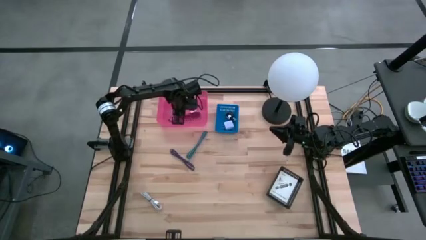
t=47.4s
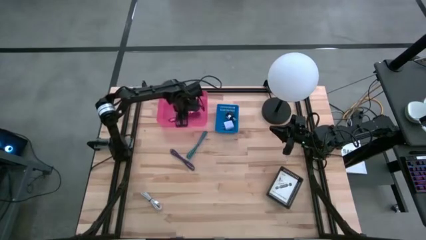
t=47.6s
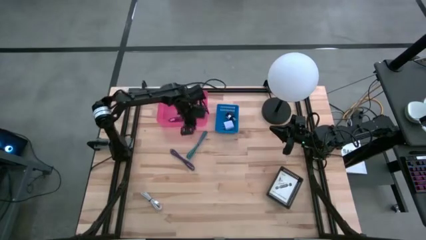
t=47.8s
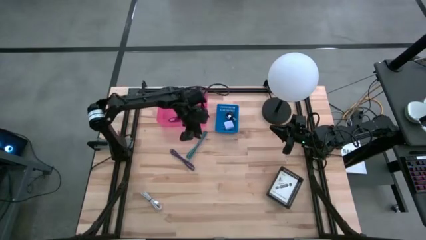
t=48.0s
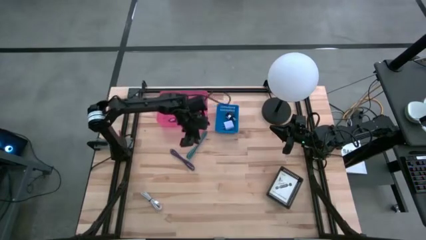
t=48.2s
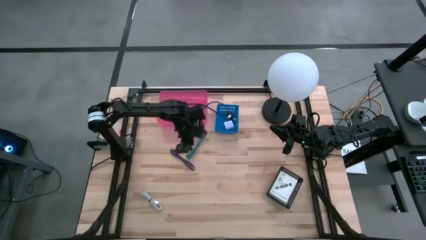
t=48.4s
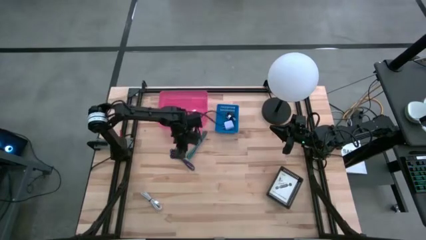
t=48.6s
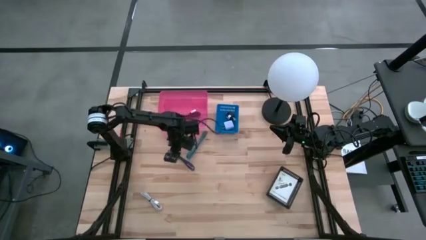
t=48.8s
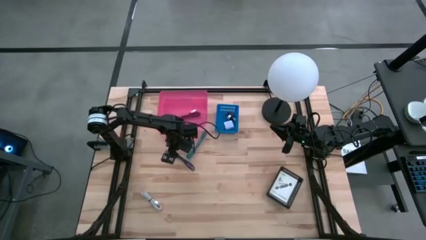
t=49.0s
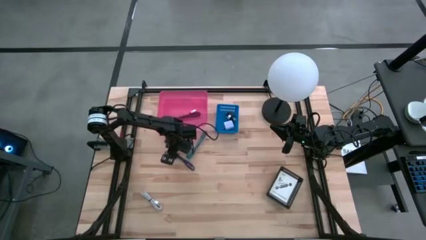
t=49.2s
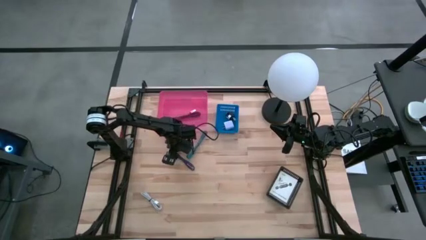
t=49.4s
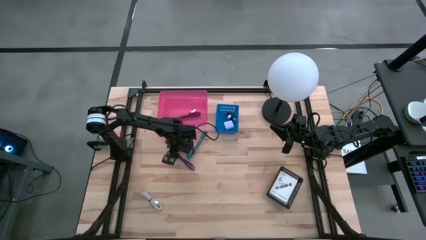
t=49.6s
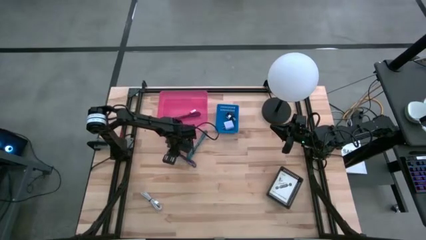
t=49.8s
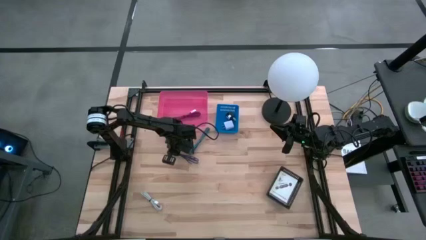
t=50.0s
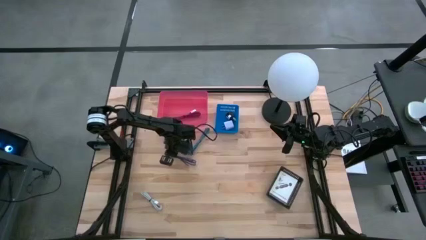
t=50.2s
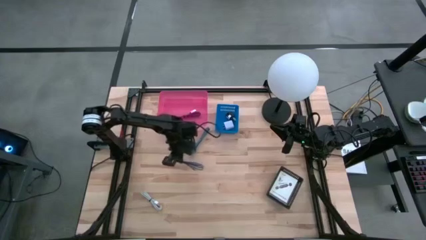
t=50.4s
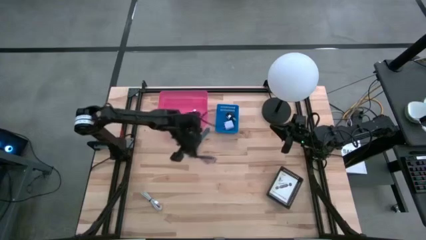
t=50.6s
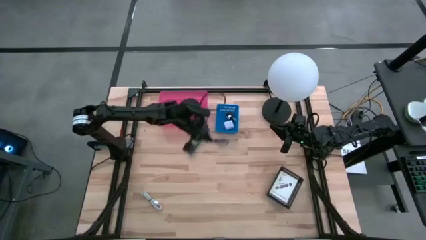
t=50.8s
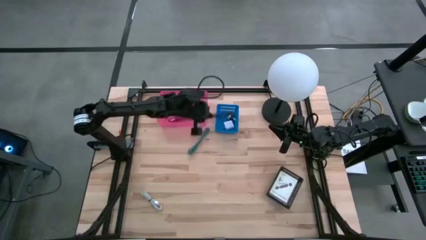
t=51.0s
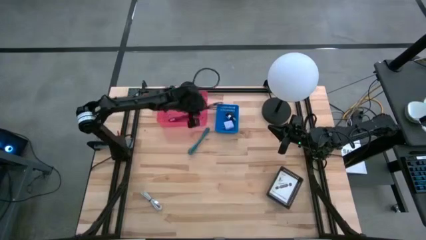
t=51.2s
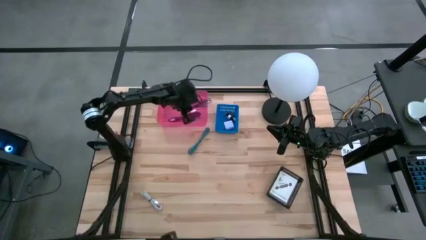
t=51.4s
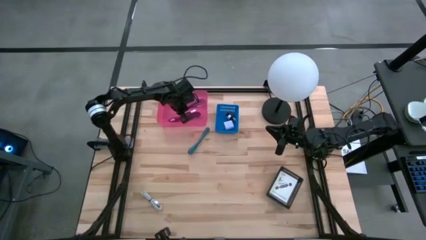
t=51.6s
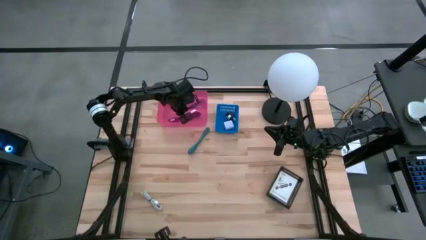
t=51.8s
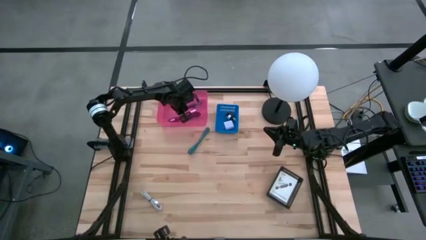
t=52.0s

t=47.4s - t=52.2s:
Task: Pick and place items into bin
Put the blue charger cable into the pink bin

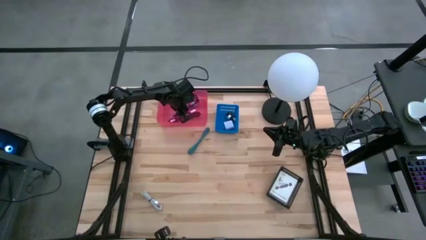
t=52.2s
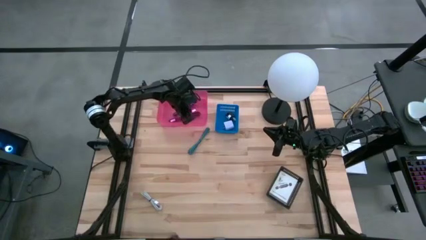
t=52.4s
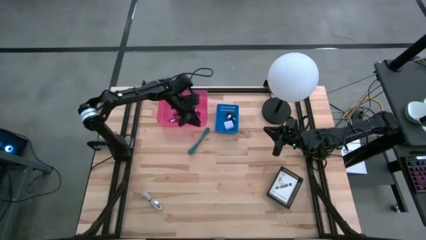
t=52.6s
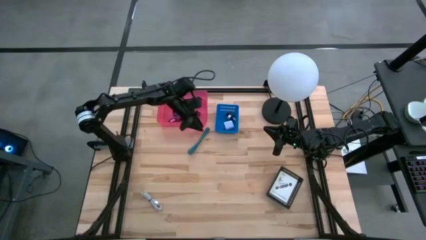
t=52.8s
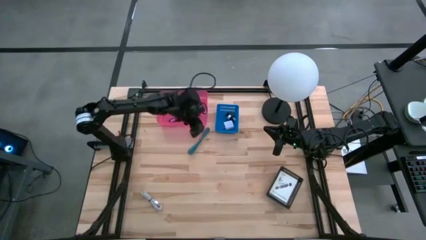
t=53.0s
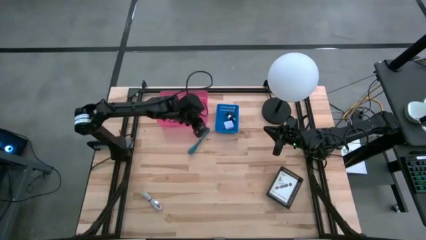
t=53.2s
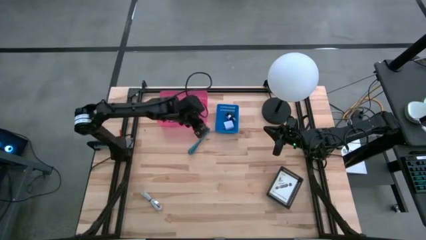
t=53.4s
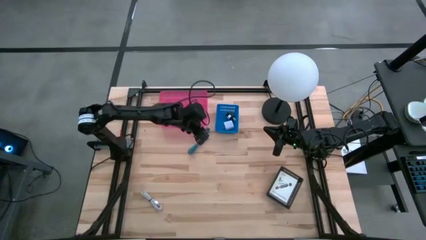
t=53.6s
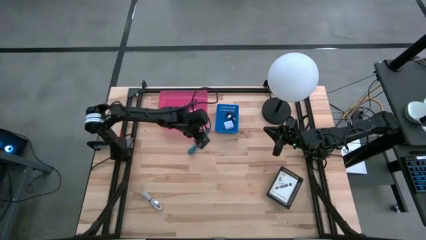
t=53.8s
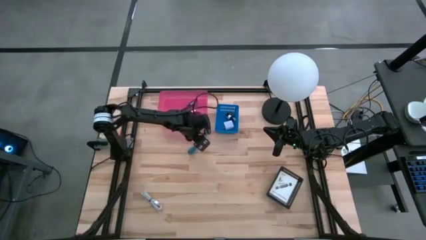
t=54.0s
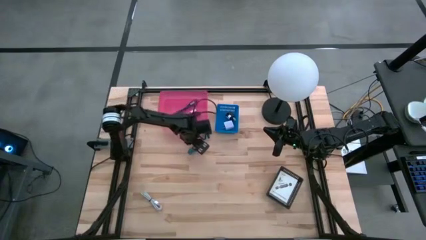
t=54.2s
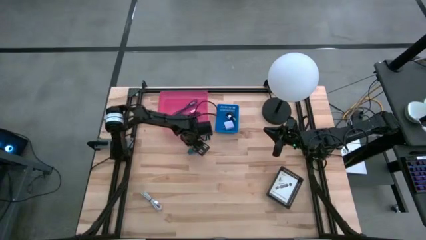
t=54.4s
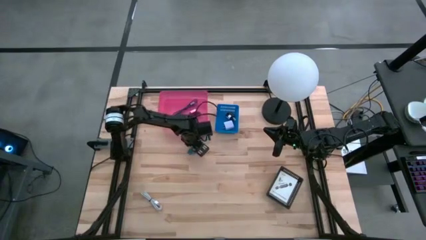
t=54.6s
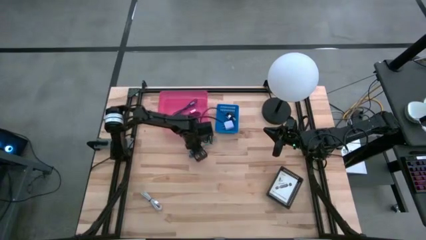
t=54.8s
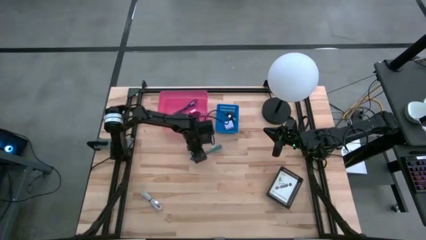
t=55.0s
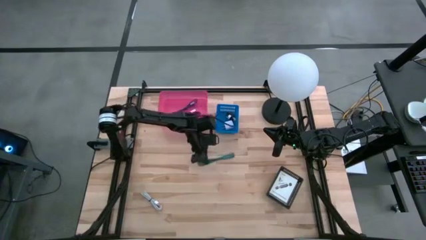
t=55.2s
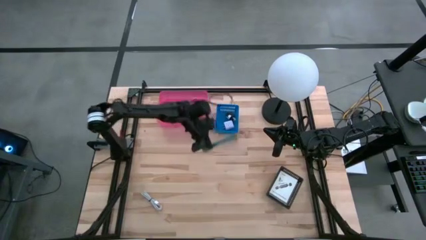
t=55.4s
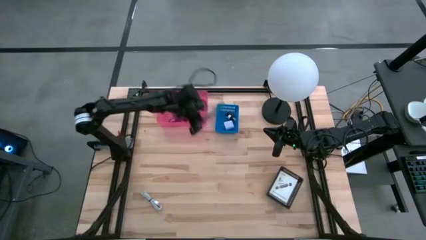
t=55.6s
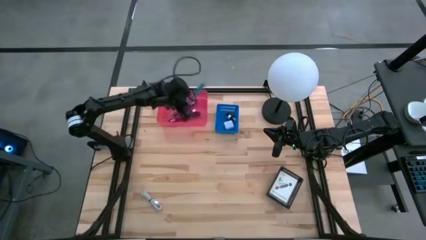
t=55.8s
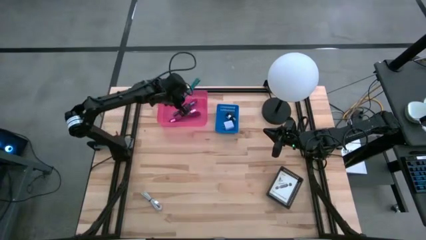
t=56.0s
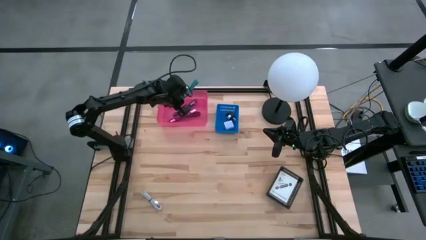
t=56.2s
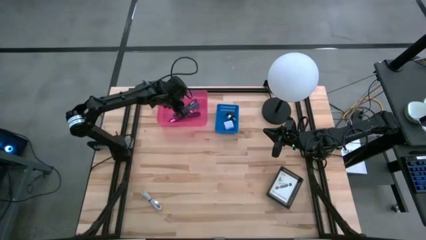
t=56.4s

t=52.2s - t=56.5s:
Put the light blue charger cable into the pink bin

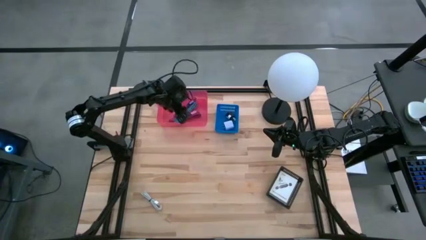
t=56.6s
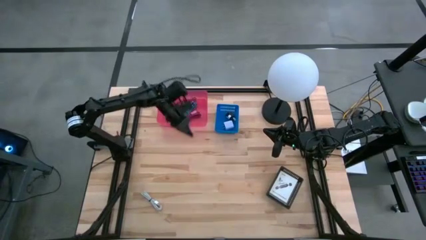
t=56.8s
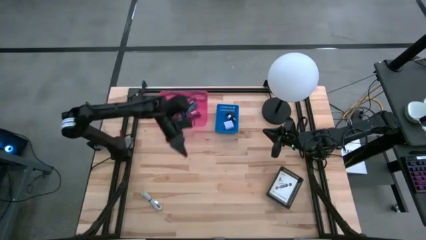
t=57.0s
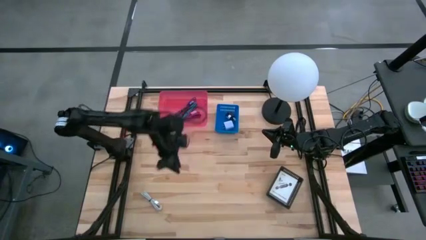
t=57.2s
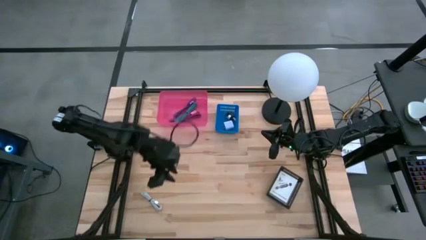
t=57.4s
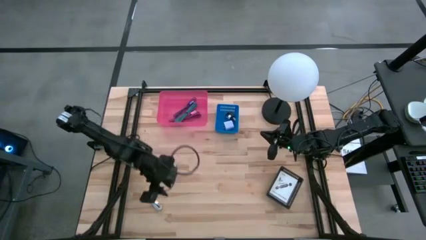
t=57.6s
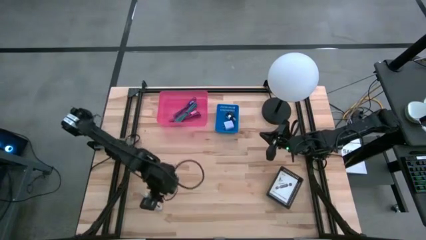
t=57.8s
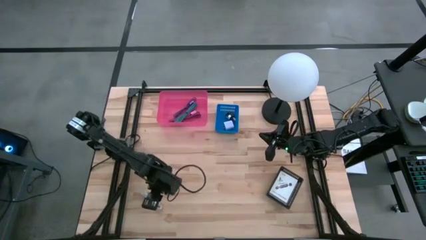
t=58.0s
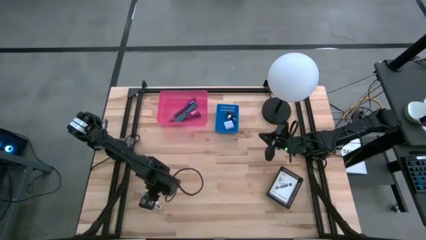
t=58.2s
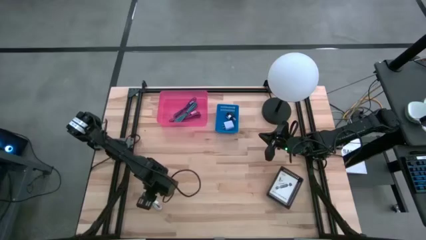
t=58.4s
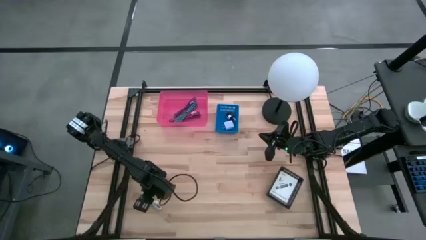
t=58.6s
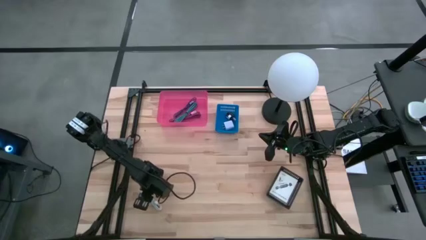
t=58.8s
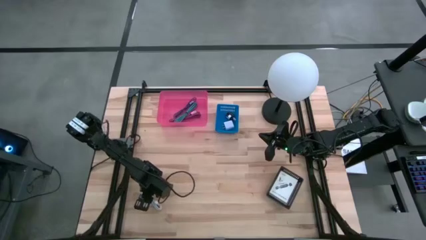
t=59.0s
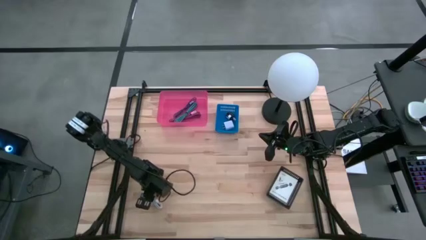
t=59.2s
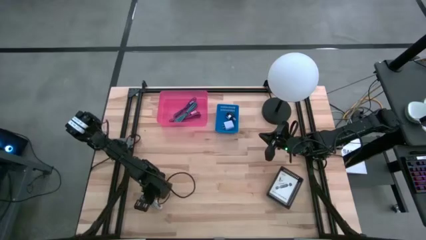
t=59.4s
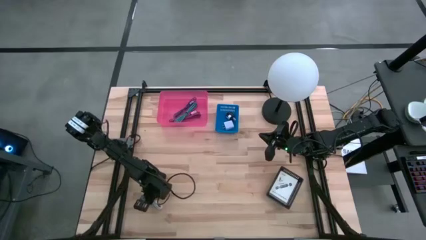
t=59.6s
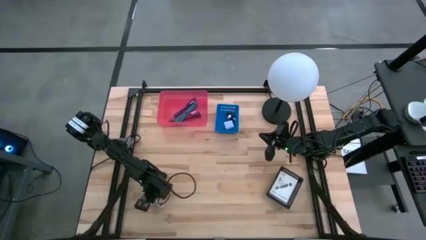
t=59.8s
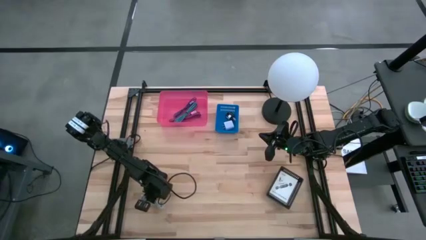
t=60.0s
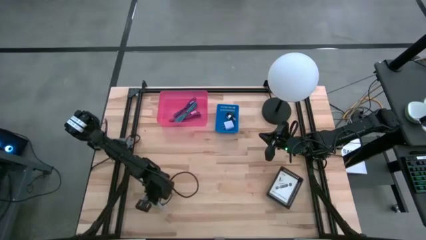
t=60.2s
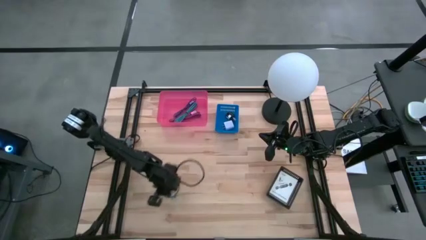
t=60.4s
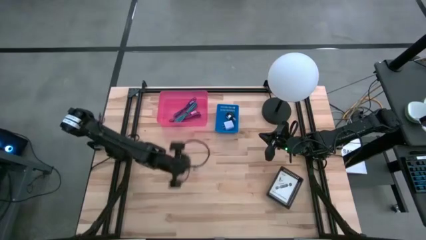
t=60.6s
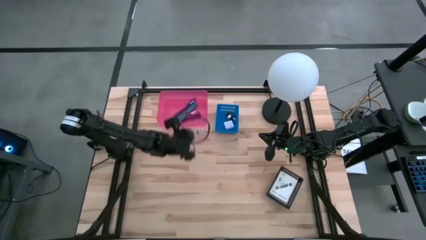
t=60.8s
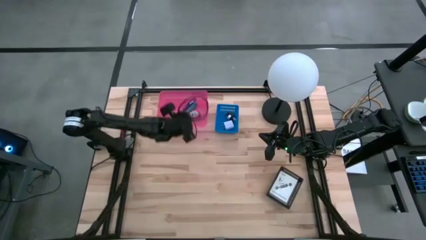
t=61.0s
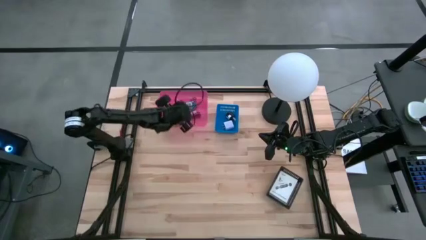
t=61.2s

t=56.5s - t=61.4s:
Put the white charger cable into the pink bin

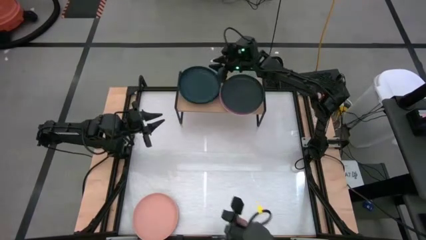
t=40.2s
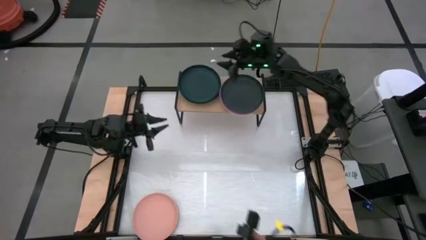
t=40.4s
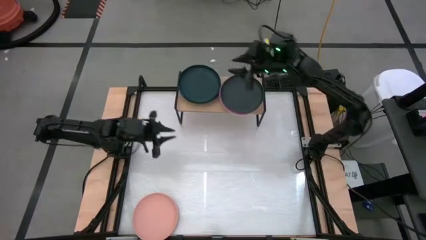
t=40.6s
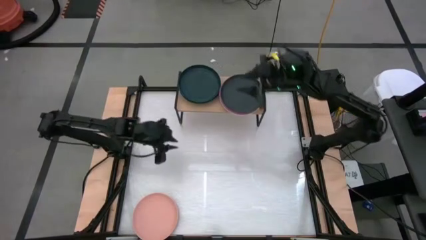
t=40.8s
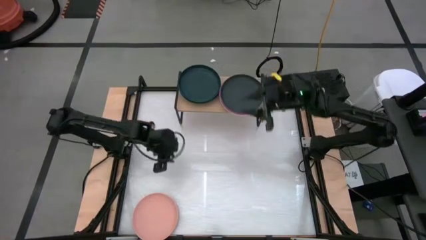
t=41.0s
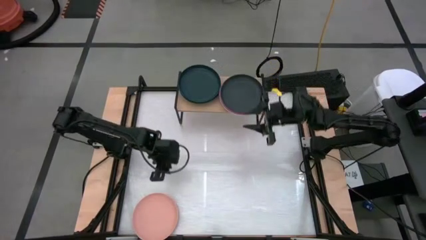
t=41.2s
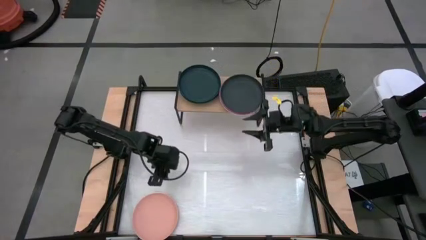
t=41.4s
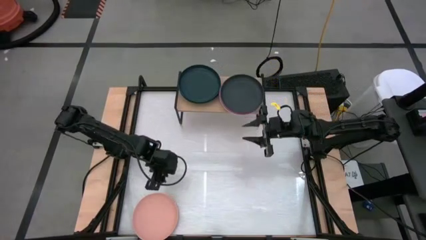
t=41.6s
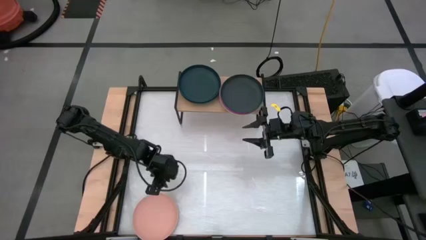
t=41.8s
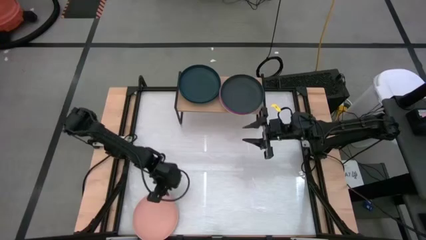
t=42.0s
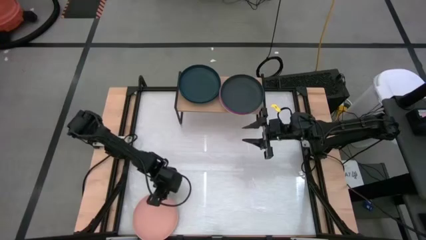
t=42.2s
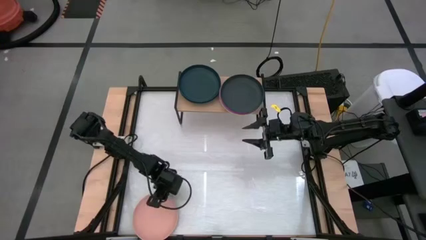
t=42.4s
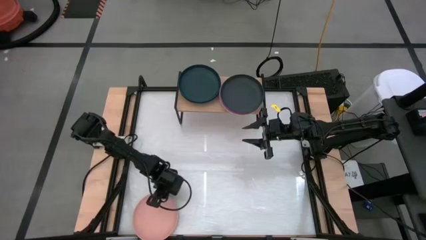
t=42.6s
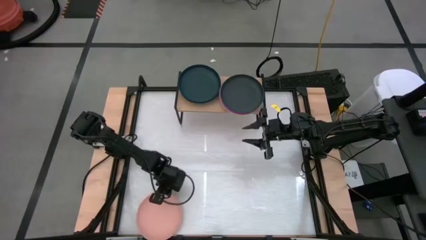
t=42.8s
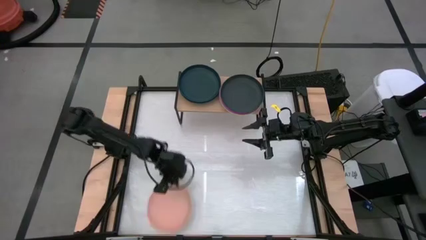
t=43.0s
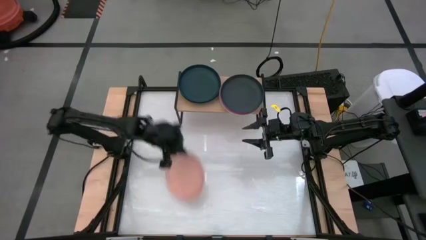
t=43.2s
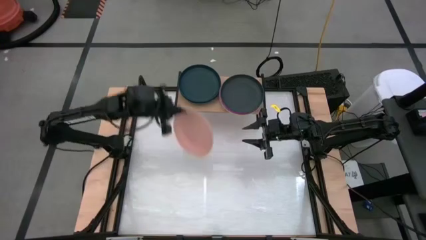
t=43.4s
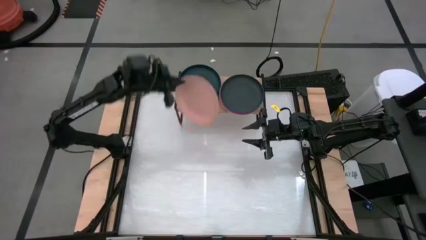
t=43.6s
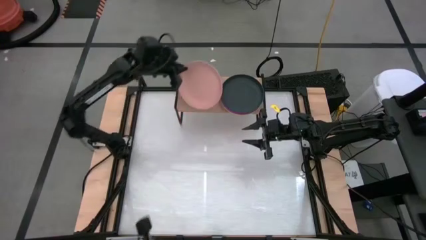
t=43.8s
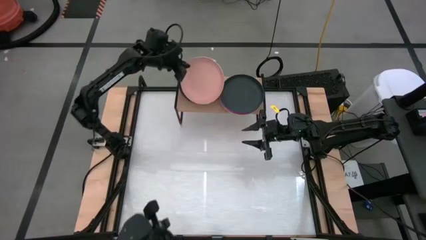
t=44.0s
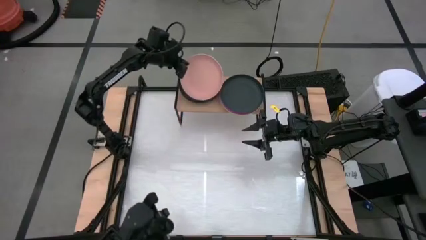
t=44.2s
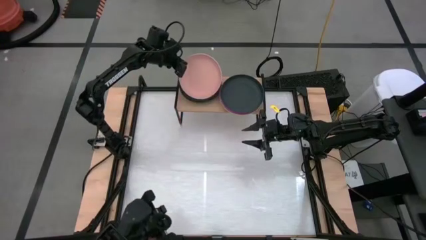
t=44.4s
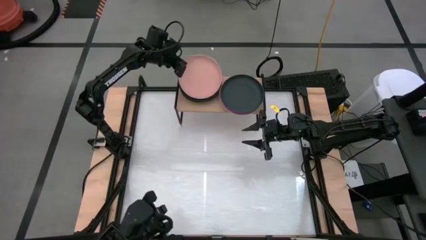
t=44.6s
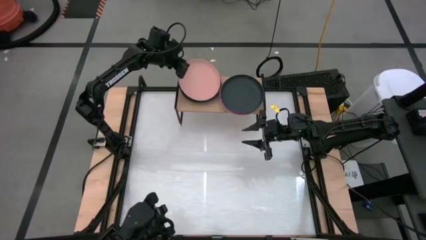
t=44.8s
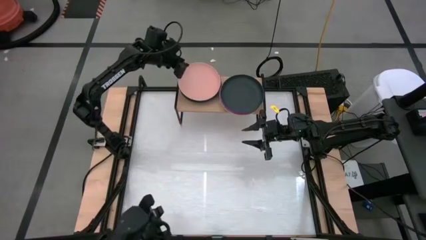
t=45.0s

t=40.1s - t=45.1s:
Task: Place and stack plates onto a shelf
Stack the light orange plate on top of the black plate on the shelf
